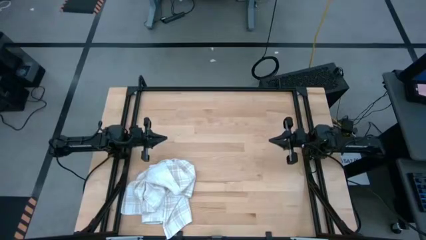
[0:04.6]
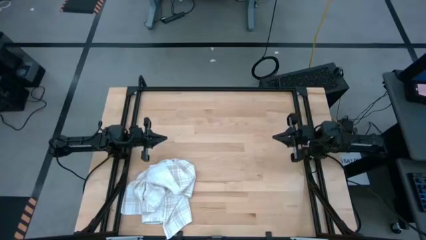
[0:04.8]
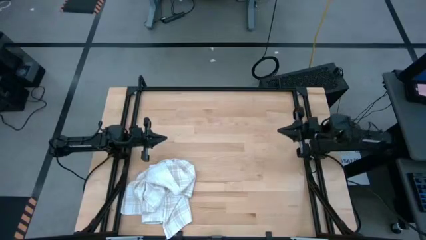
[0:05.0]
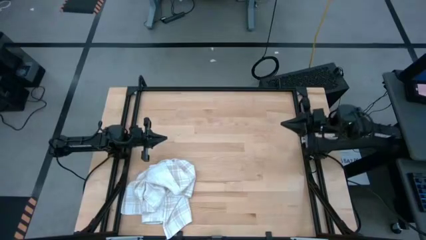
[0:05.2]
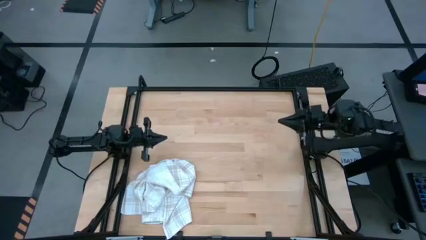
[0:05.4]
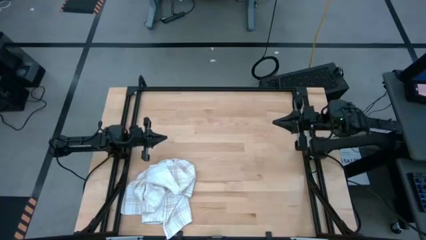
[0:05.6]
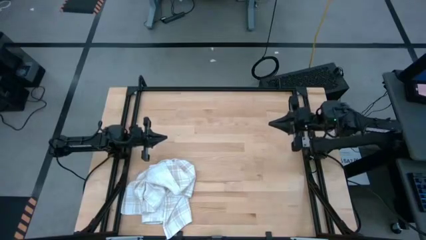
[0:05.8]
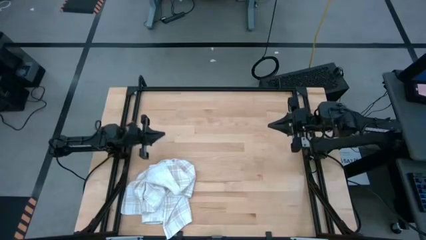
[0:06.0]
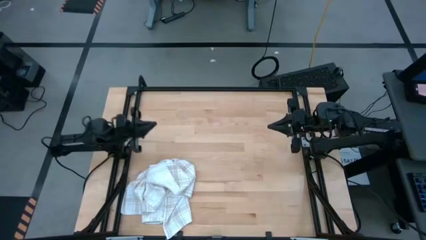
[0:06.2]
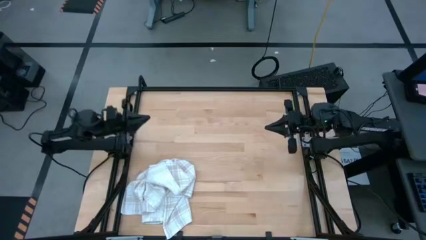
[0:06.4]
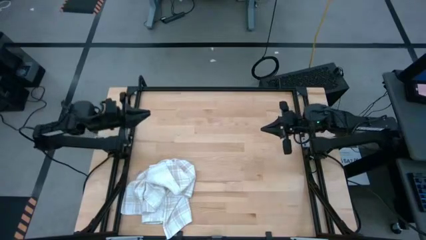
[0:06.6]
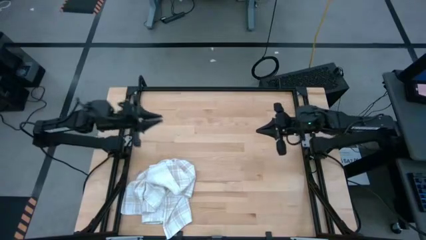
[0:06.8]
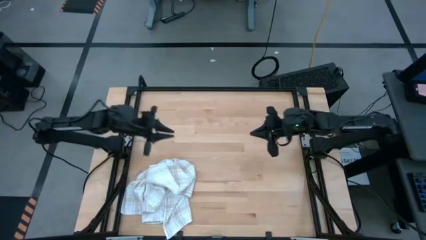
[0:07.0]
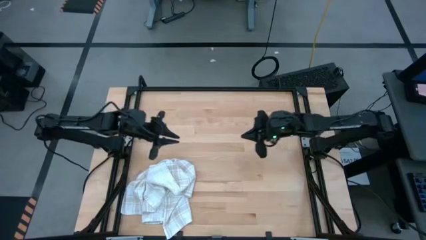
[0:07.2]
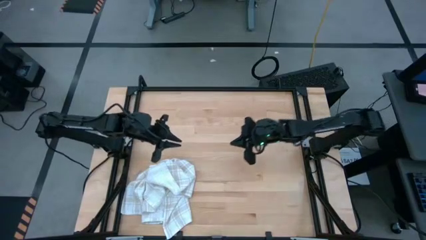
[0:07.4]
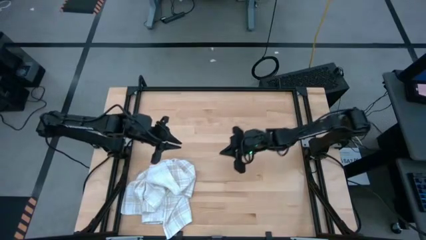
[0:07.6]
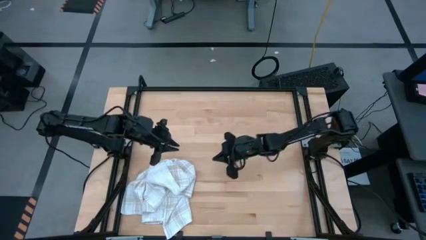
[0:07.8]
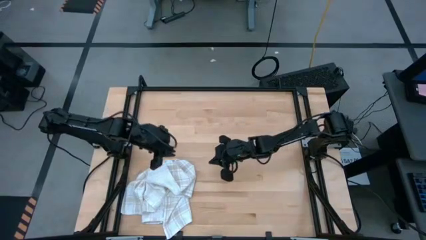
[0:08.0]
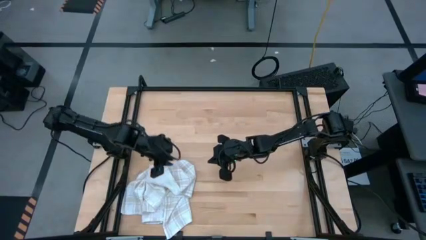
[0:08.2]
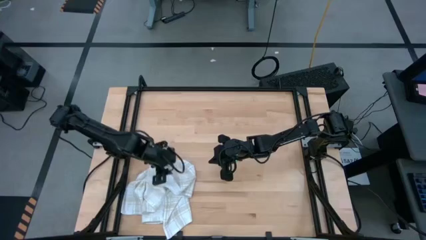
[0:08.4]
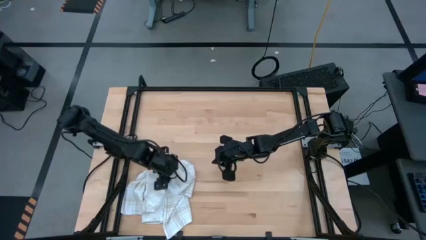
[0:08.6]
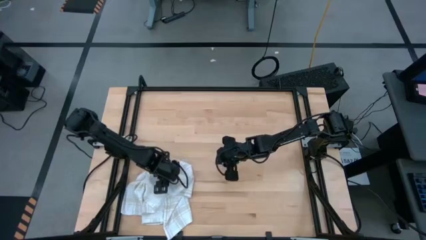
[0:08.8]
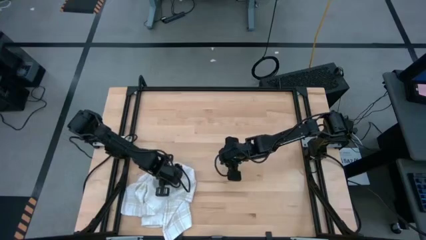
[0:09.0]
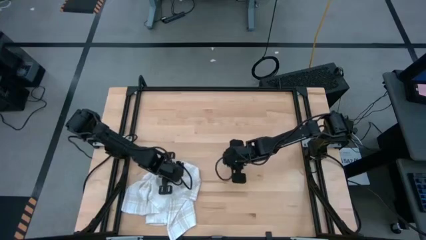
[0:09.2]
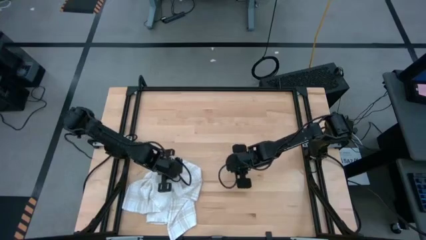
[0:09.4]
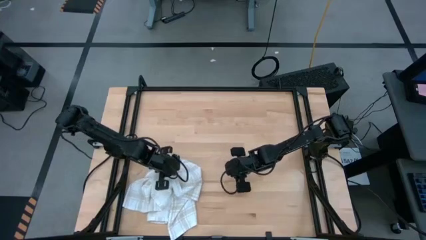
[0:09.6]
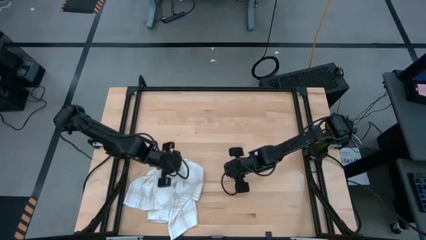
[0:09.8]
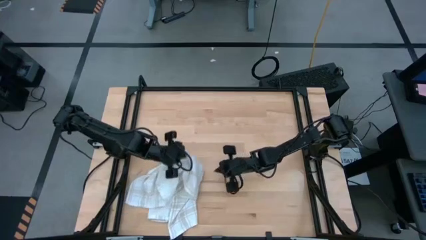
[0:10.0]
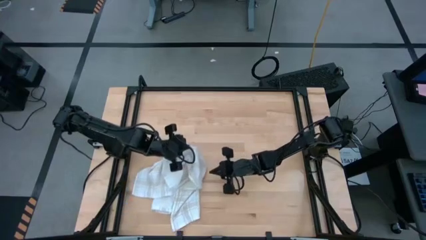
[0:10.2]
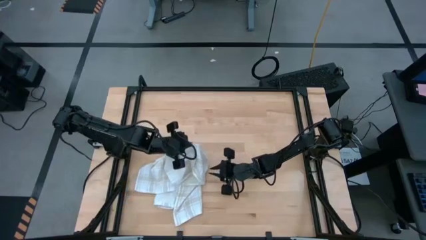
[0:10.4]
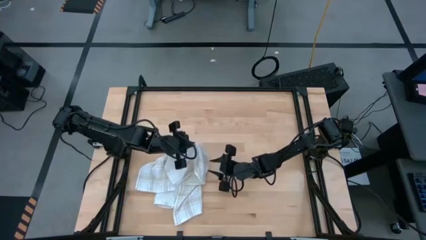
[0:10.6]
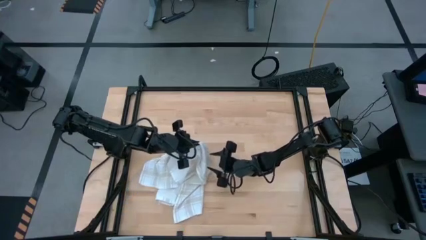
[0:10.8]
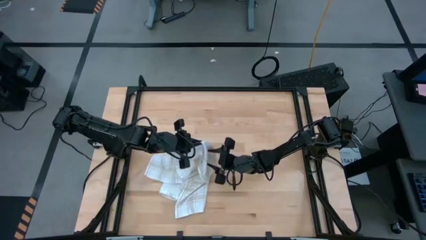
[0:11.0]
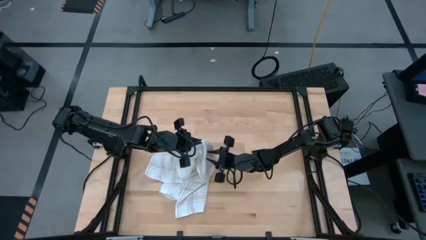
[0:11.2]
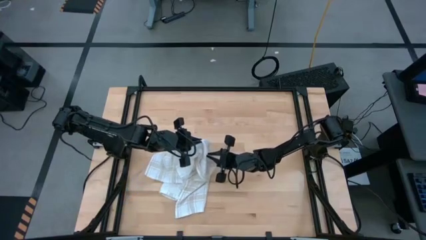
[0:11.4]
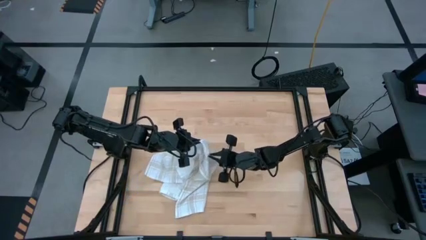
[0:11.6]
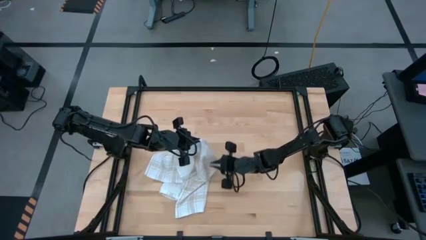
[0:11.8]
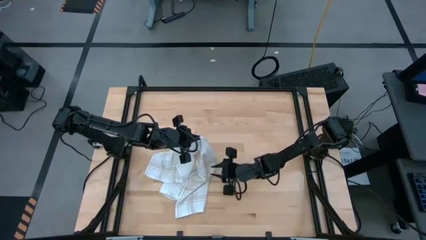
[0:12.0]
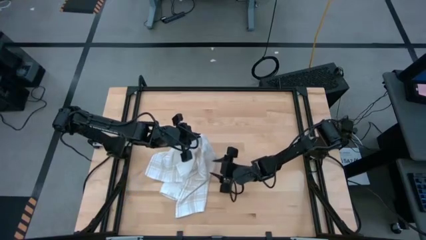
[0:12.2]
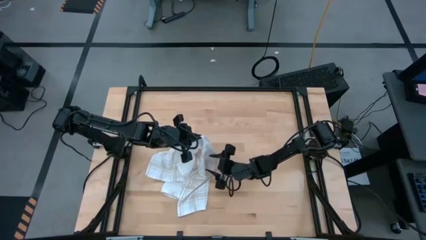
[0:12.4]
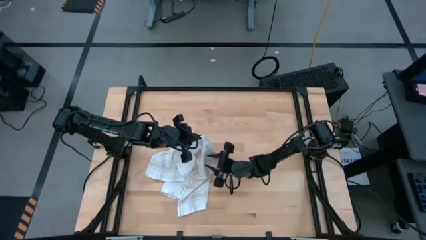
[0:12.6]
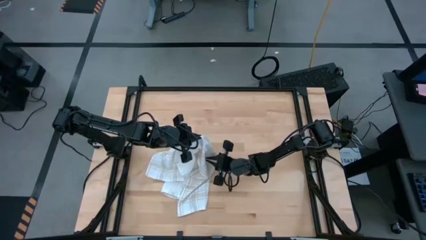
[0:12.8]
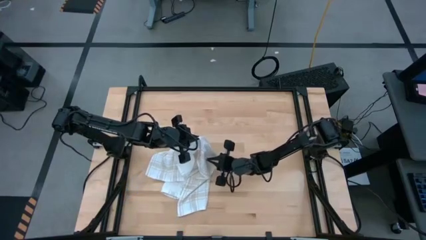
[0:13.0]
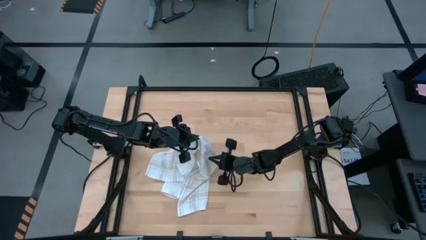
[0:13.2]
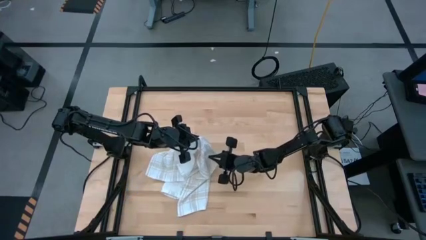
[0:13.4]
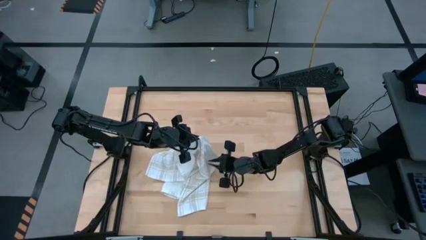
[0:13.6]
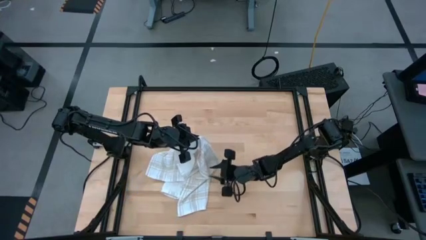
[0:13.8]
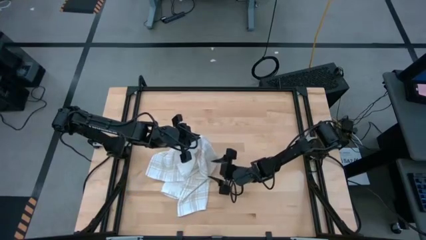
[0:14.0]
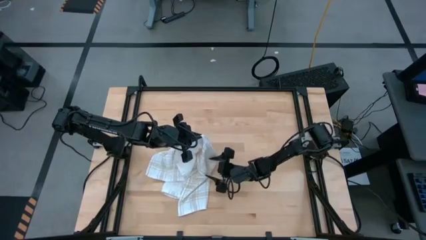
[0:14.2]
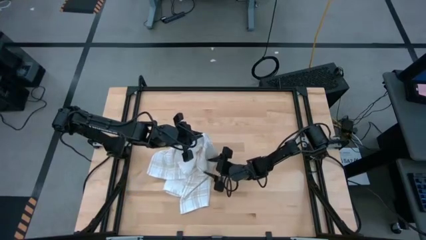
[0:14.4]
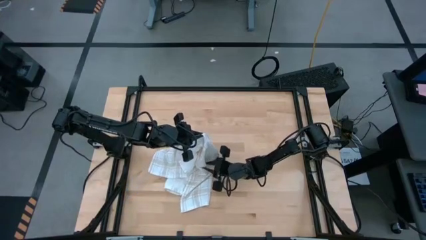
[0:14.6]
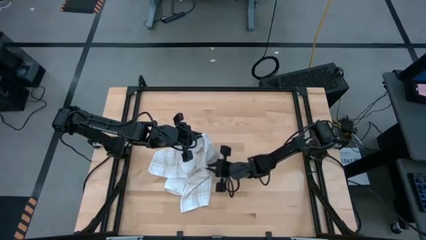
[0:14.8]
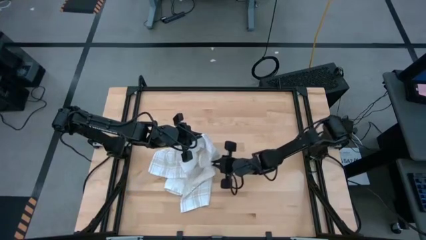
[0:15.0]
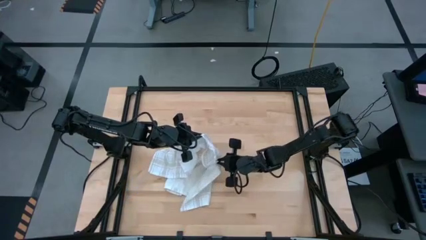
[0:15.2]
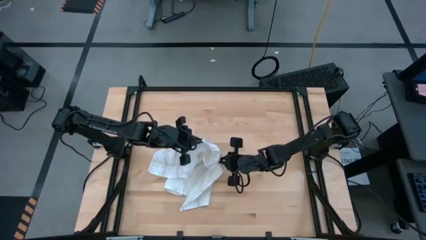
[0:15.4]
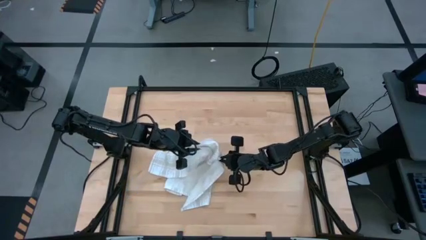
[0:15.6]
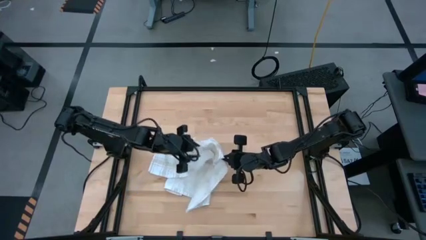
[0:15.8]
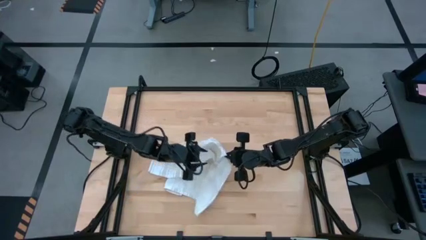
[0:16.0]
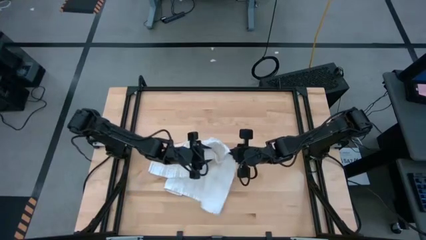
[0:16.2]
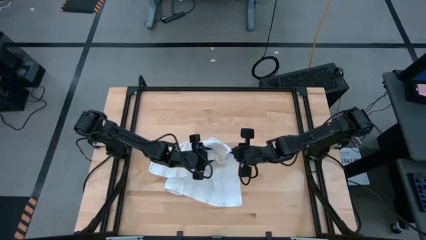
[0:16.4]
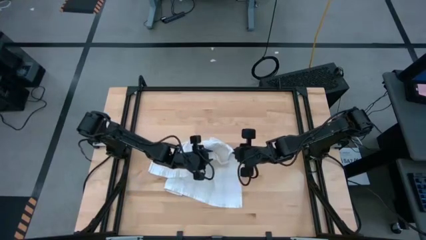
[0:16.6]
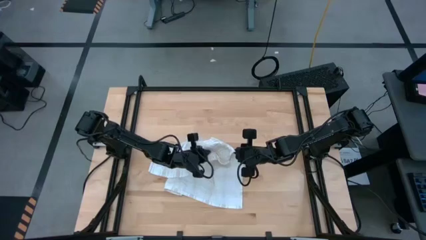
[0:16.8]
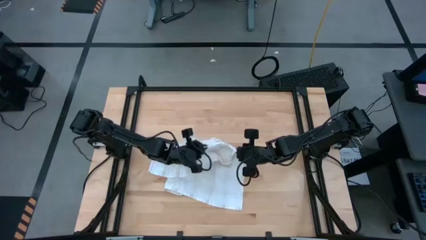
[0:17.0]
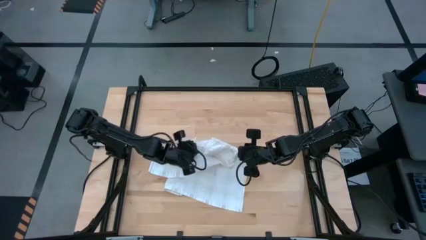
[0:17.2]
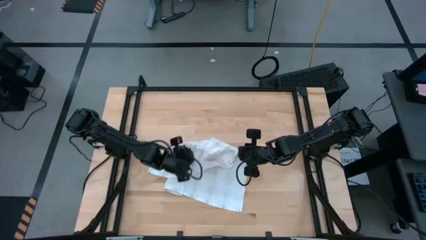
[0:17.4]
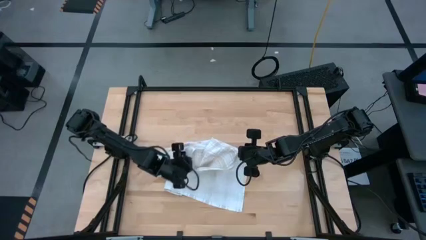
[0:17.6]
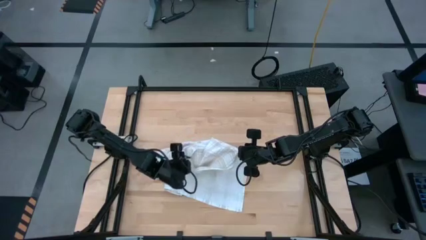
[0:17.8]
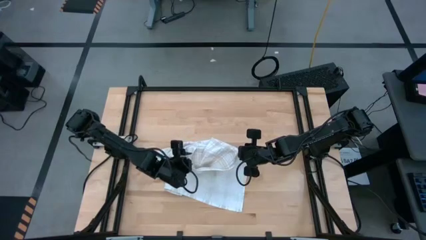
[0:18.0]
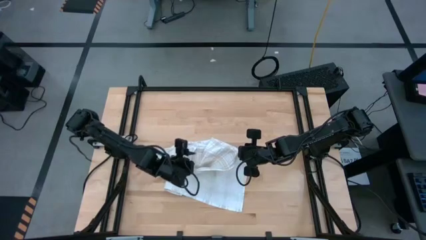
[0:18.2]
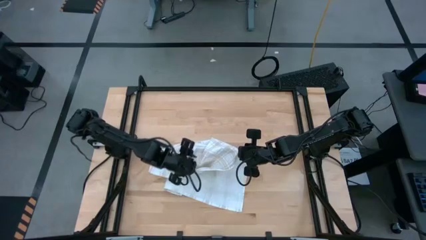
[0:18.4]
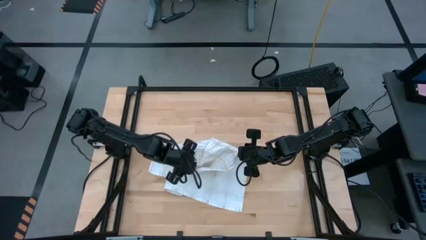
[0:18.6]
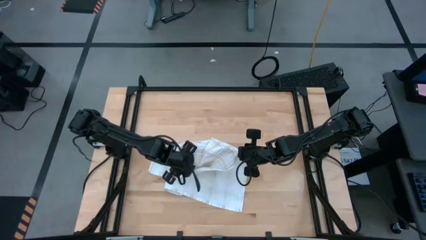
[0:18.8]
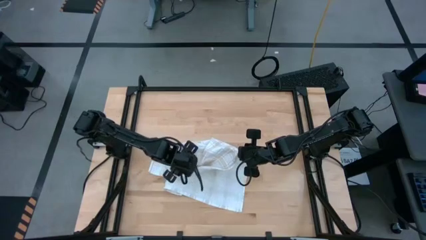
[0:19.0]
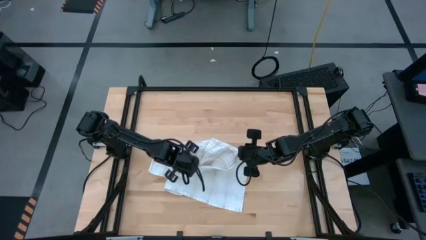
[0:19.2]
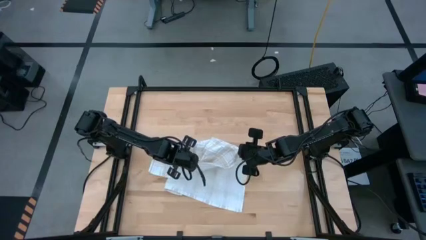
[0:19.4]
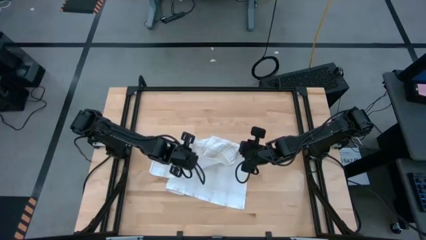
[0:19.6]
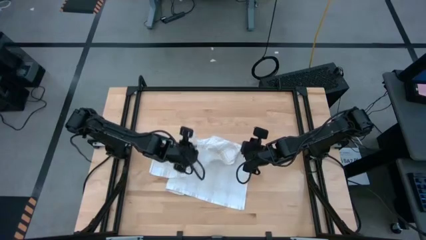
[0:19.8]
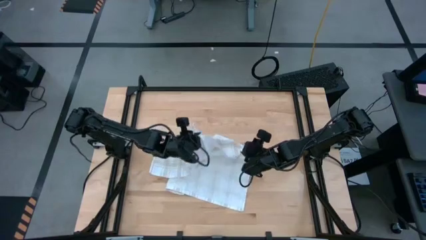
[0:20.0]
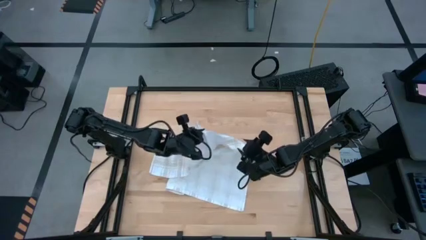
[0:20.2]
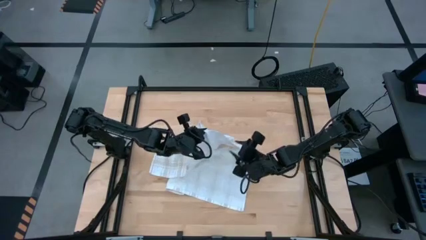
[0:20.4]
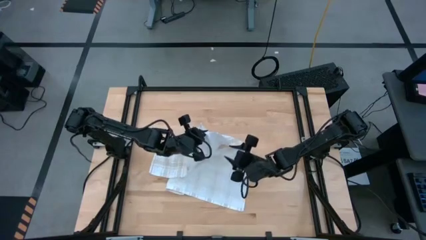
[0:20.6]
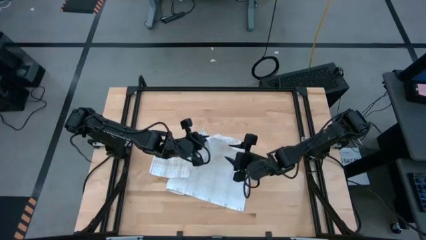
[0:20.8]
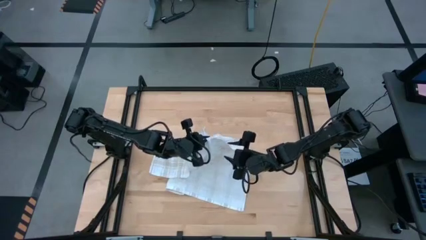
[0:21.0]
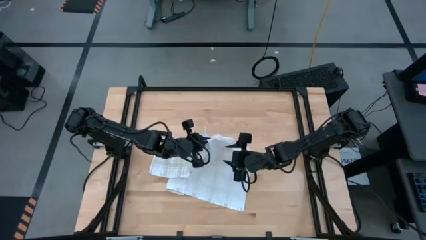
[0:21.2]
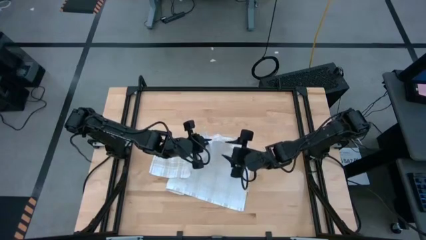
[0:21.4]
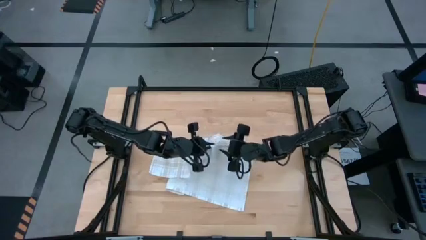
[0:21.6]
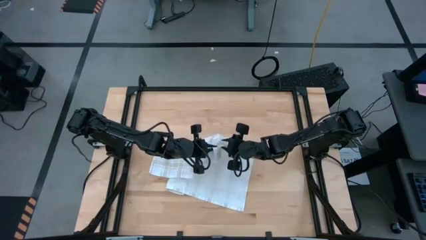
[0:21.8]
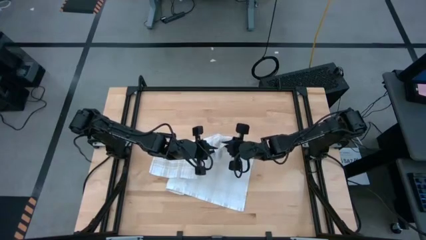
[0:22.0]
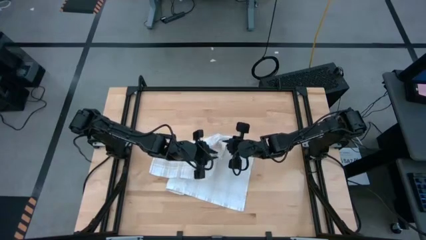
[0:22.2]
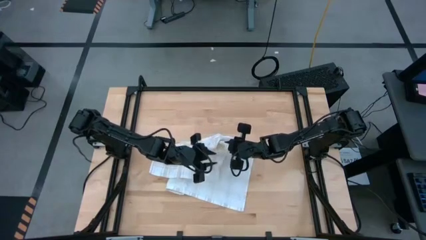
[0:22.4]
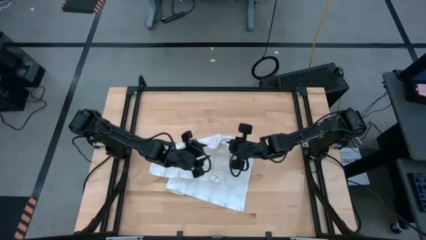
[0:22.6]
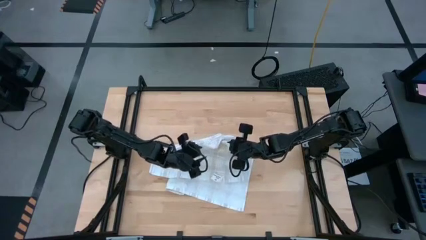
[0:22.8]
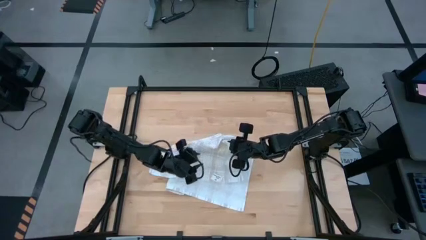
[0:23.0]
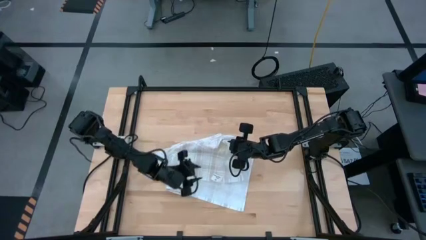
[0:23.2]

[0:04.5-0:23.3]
Task: Roll towel
Roll the white kitchen towel
